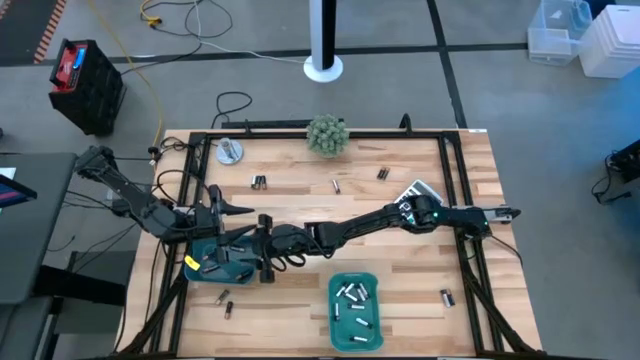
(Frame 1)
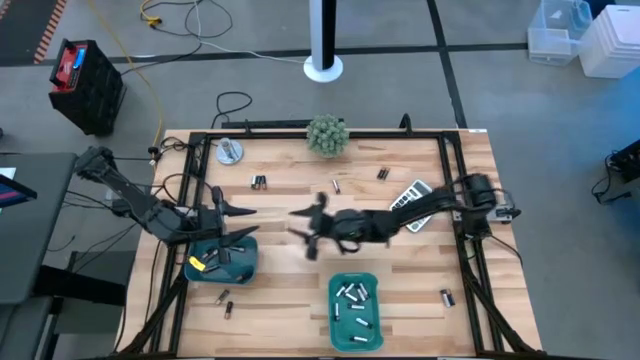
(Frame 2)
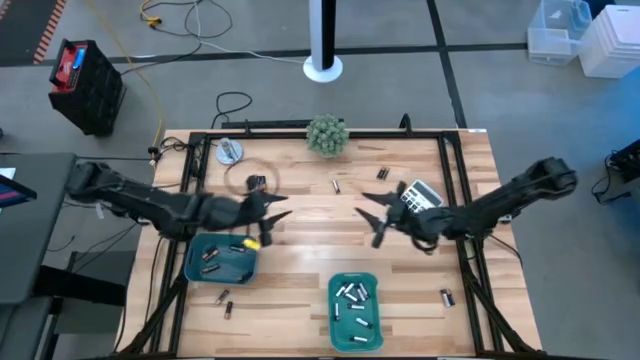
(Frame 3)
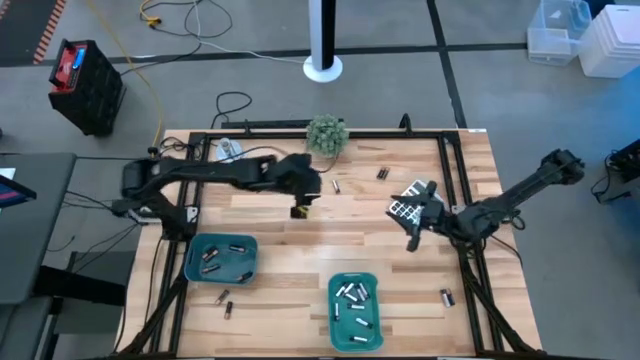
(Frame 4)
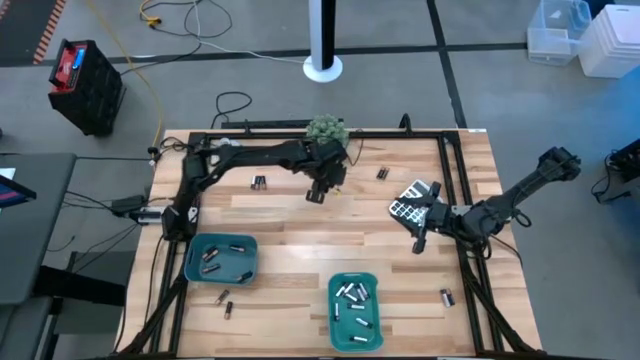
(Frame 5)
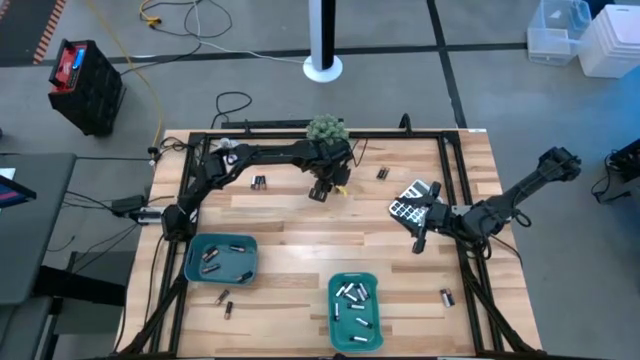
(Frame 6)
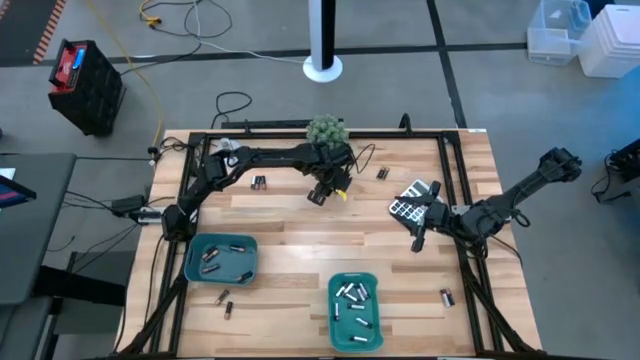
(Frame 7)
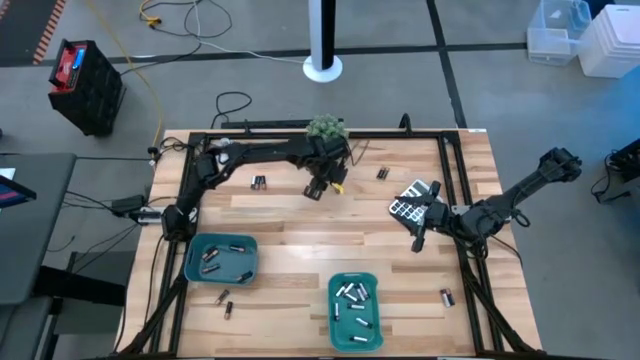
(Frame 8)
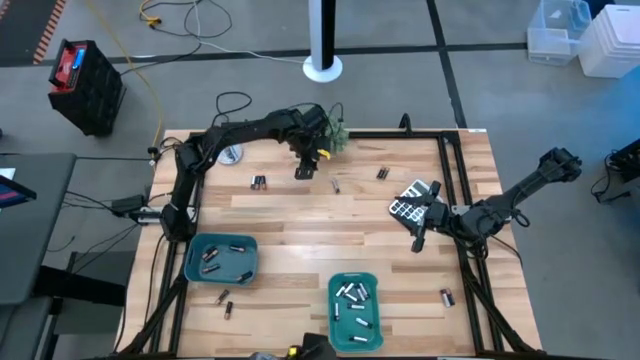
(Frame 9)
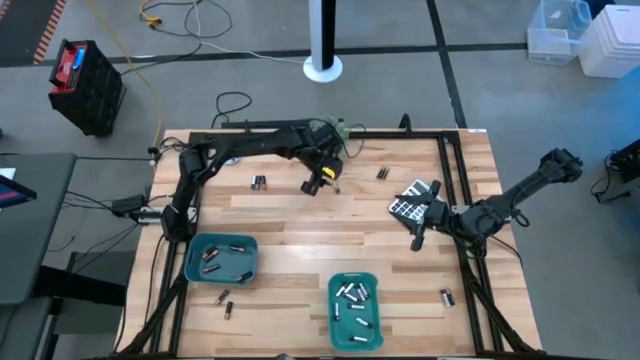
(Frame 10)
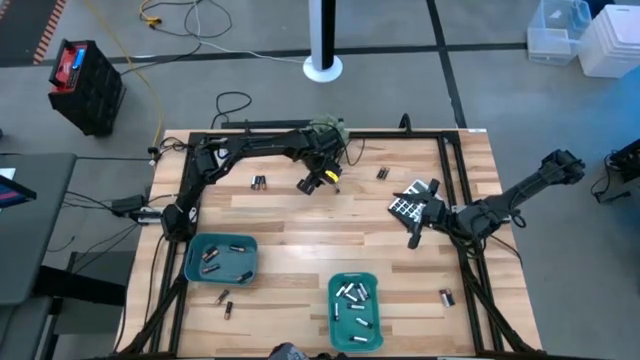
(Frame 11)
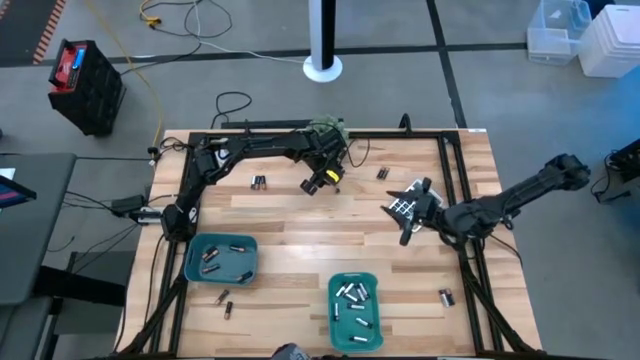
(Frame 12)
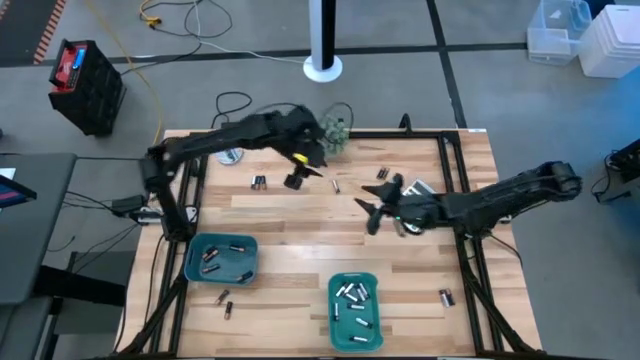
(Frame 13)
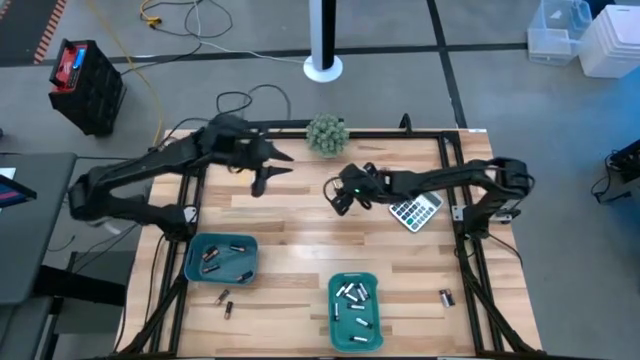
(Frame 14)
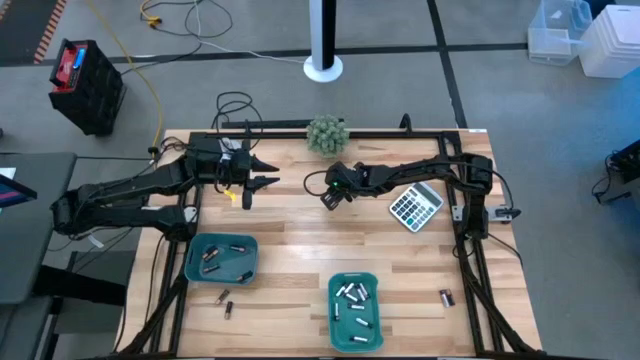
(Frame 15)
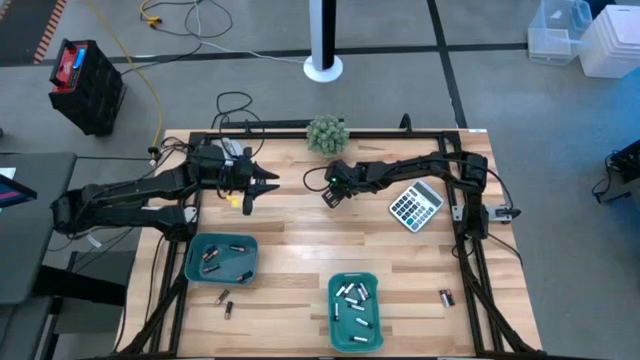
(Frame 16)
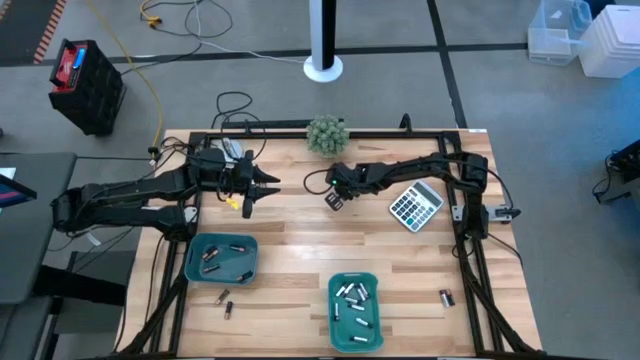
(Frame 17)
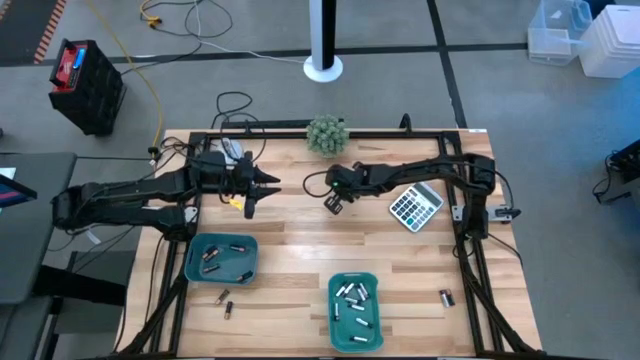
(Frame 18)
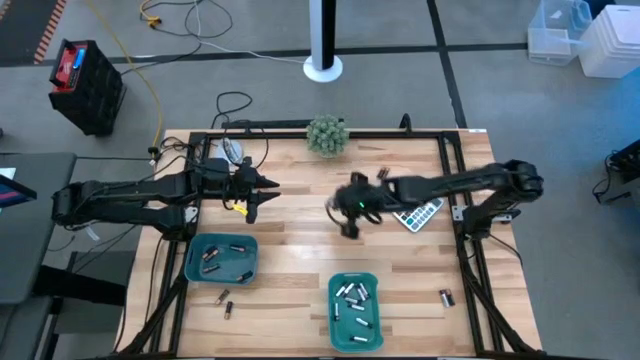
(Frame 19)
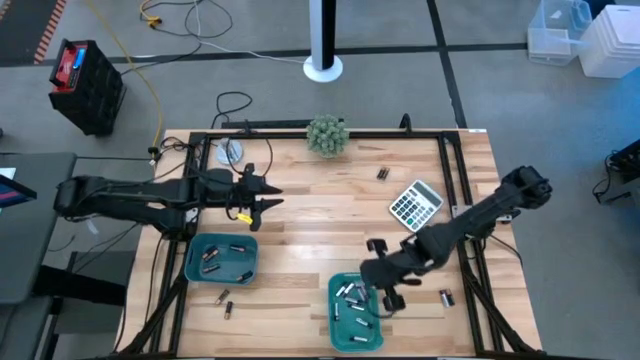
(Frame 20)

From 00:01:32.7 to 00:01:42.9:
Task: Sort batteries
Put the silver battery into the green bin

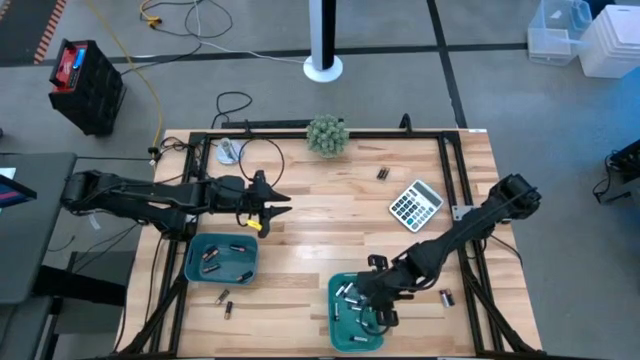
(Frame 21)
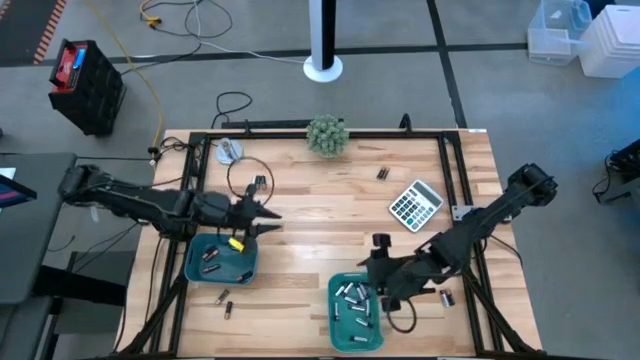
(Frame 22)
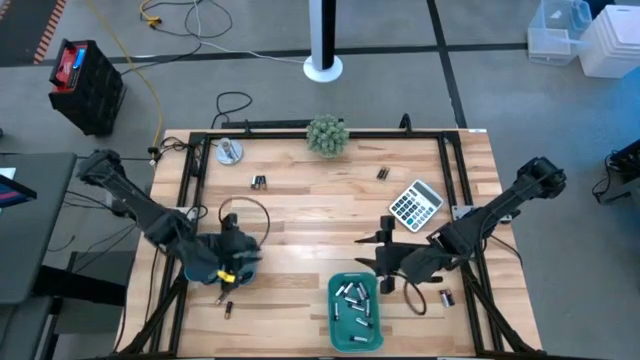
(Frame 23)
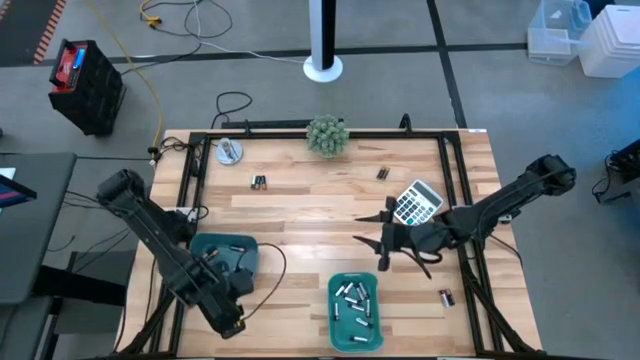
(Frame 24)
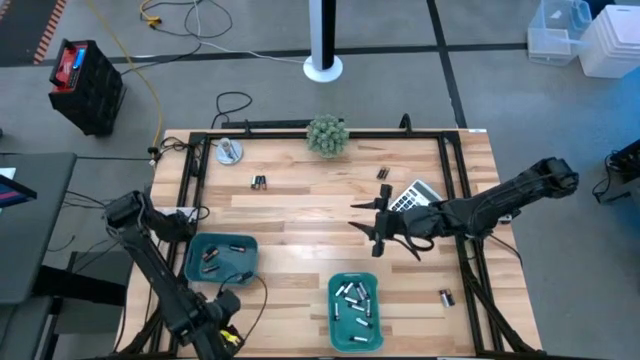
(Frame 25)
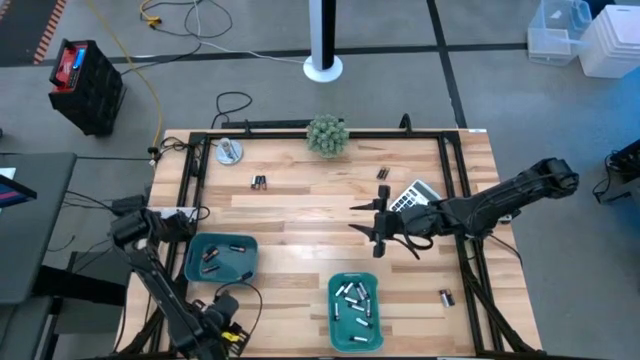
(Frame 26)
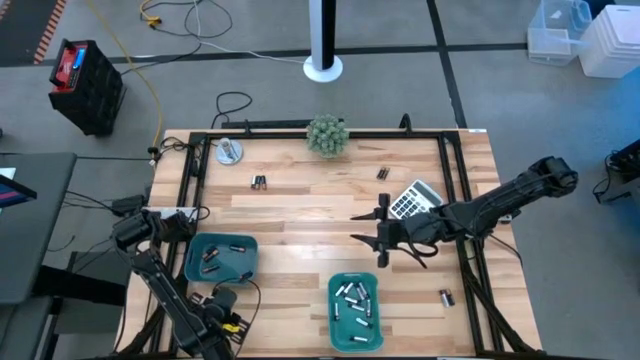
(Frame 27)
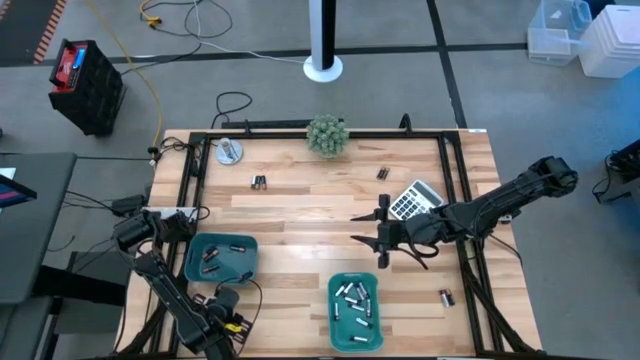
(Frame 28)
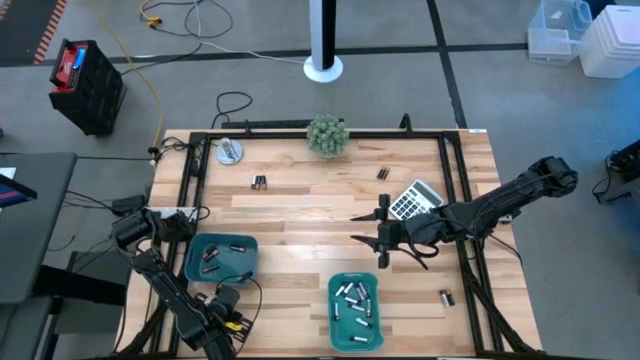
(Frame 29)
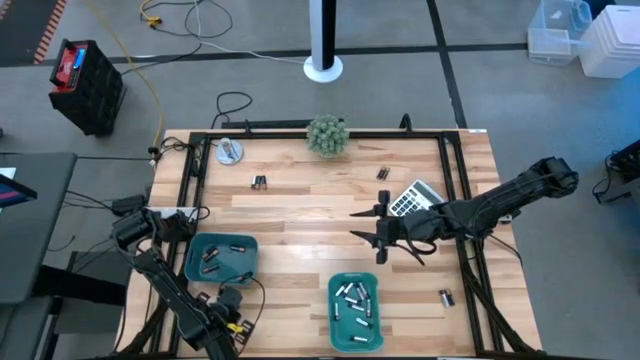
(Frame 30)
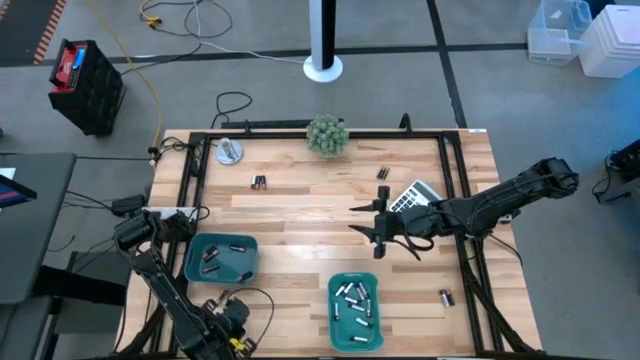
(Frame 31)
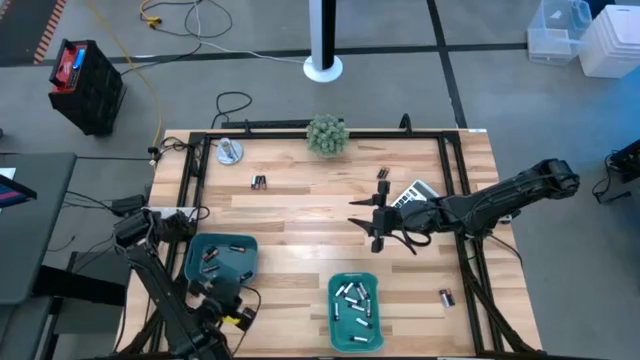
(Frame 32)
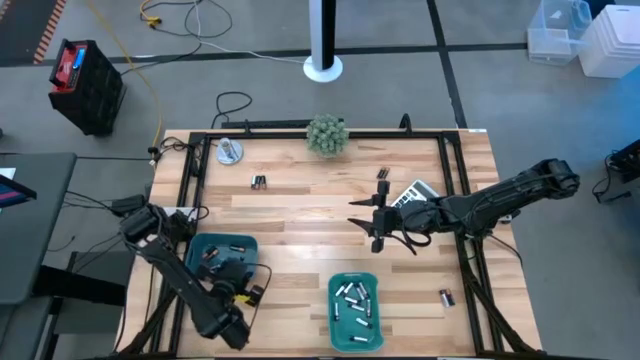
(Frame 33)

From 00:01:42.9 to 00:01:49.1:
Put the black battery into the blue bin

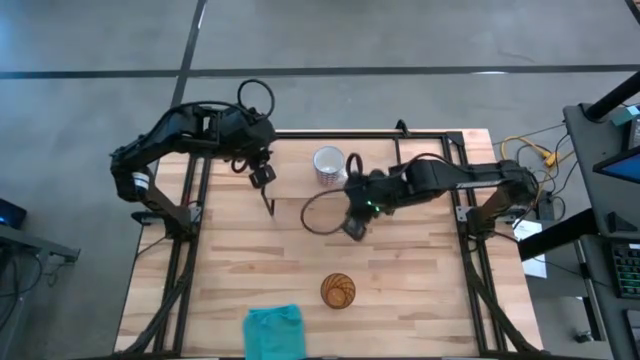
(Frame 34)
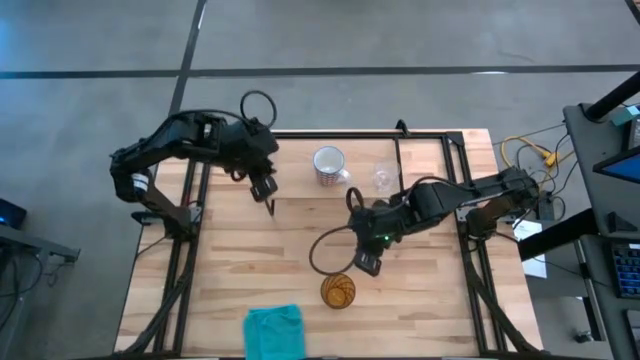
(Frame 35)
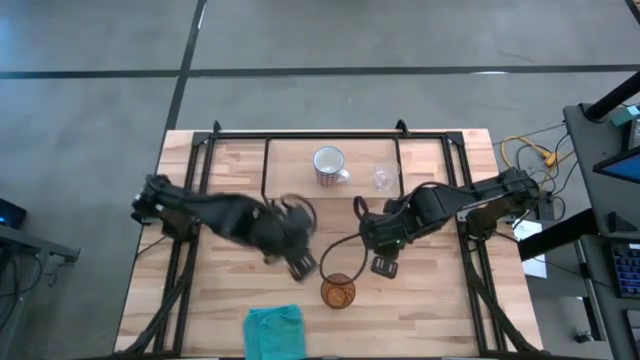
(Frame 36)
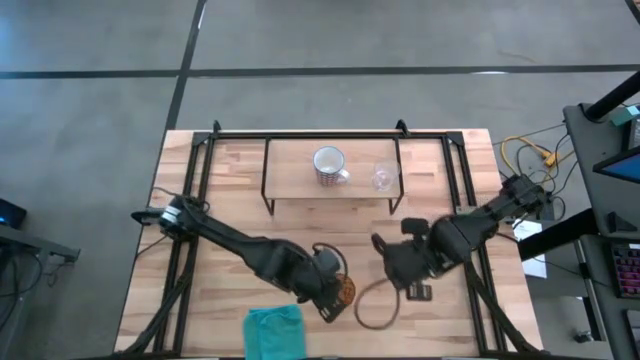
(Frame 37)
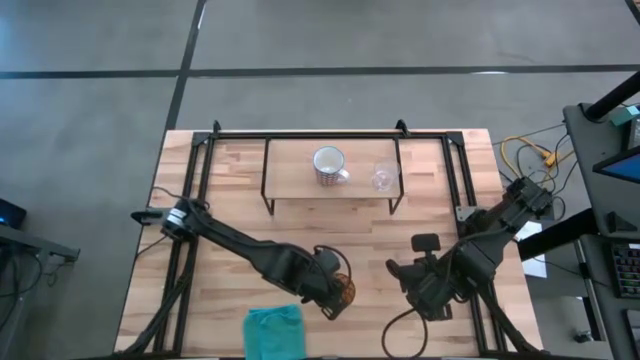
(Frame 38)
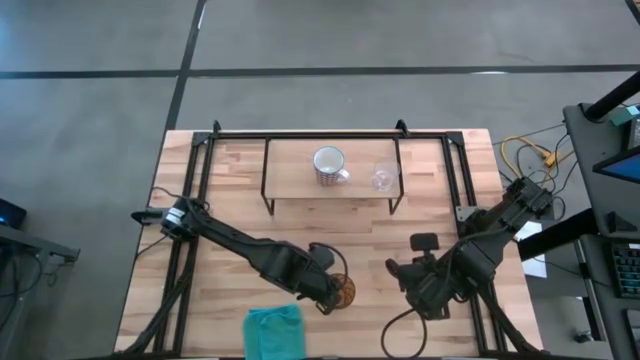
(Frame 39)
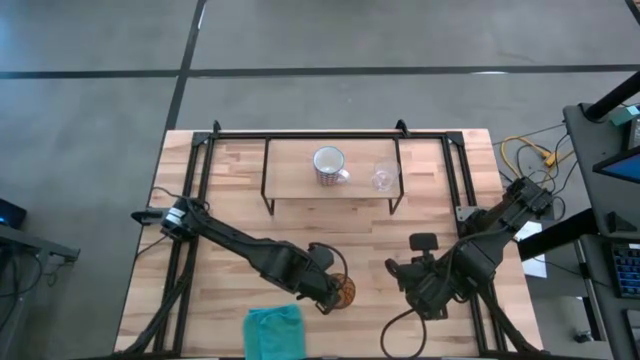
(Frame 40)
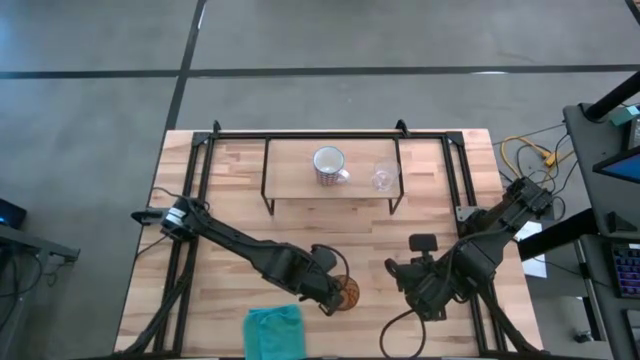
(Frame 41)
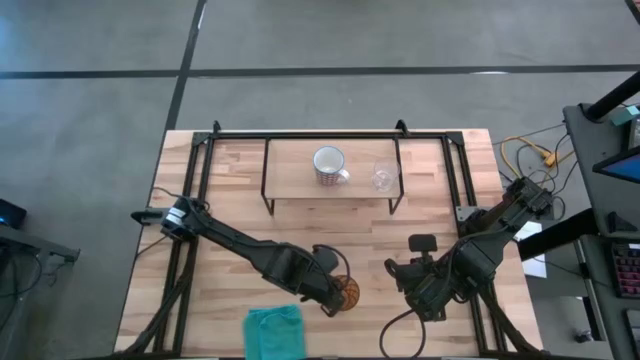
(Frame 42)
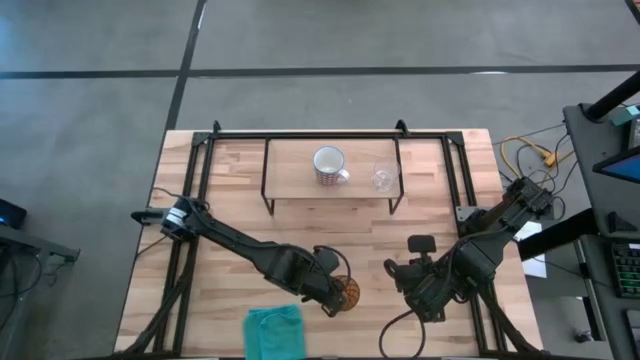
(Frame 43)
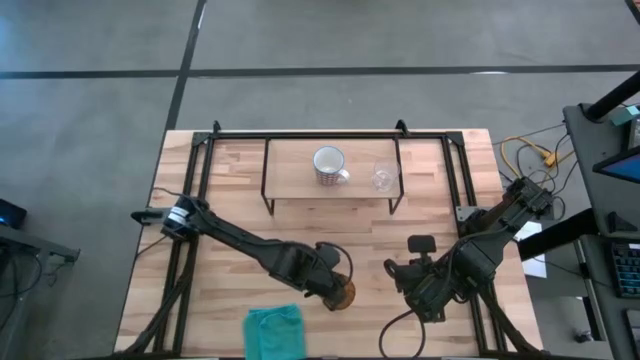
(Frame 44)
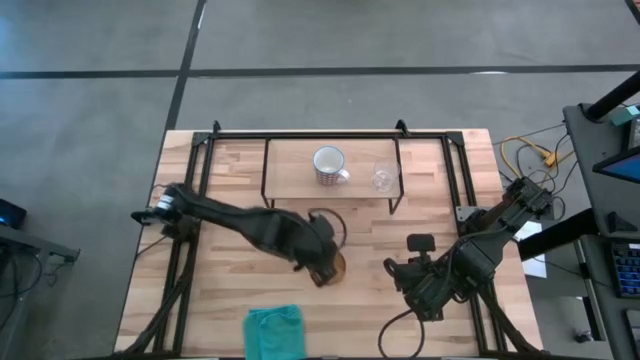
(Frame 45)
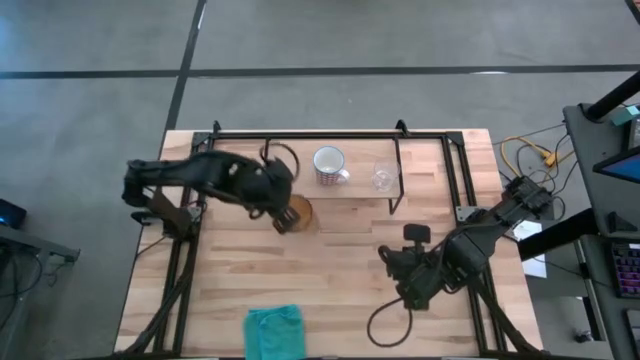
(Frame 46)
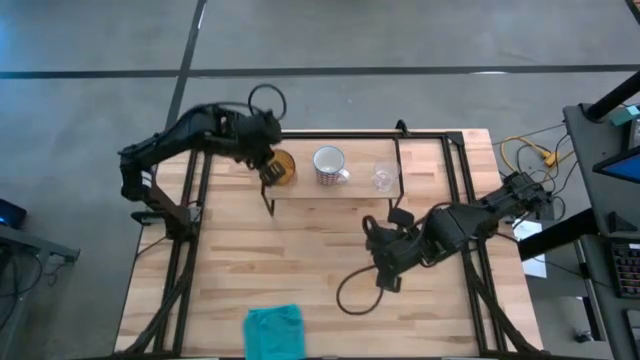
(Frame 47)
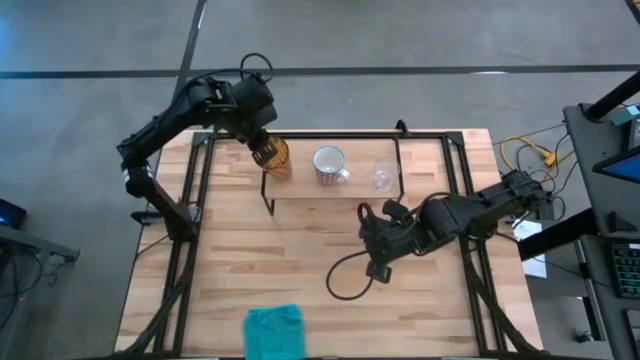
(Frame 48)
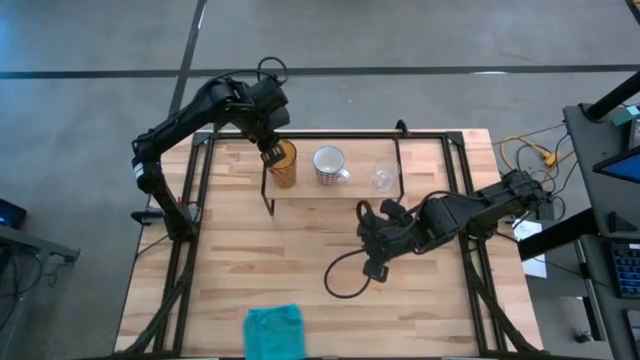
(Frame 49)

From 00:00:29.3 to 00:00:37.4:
Task: Stack small to large cups/mugs on shelf
Put the brown cup on the shelf
